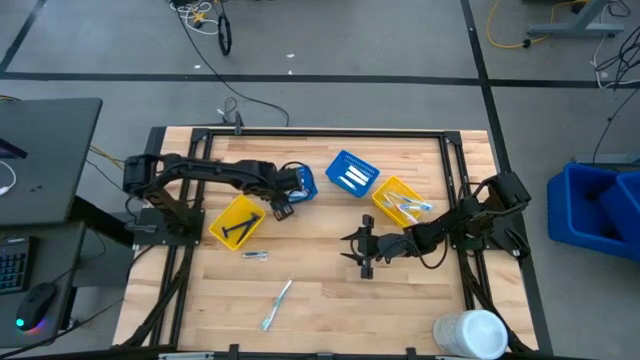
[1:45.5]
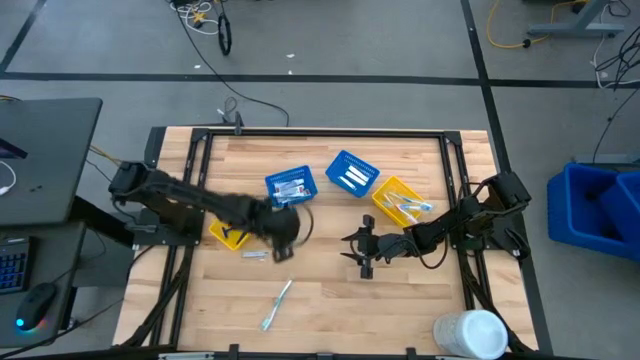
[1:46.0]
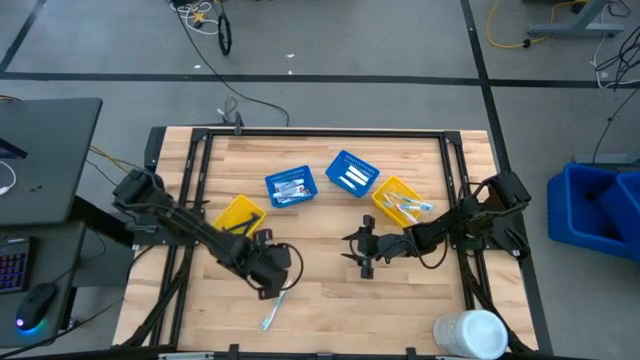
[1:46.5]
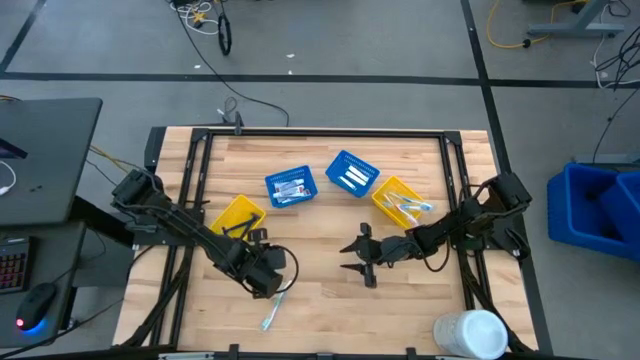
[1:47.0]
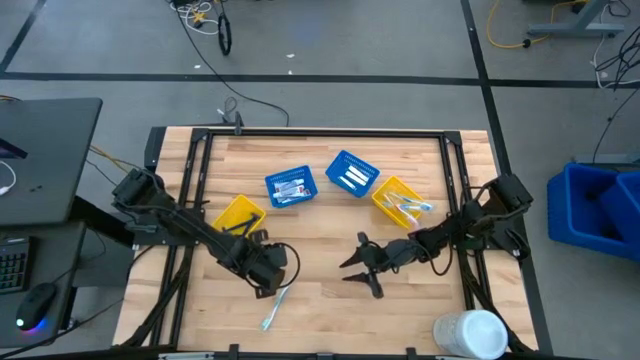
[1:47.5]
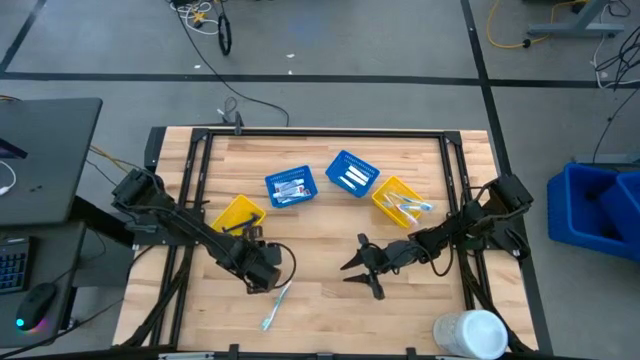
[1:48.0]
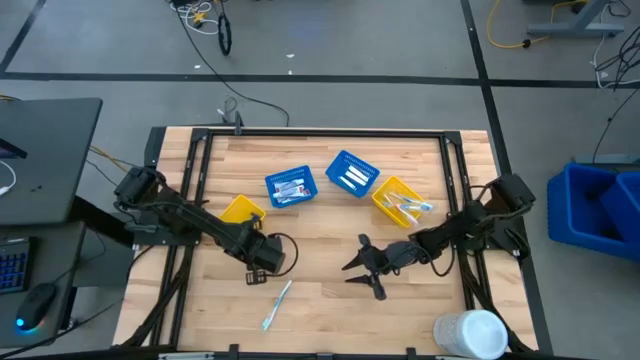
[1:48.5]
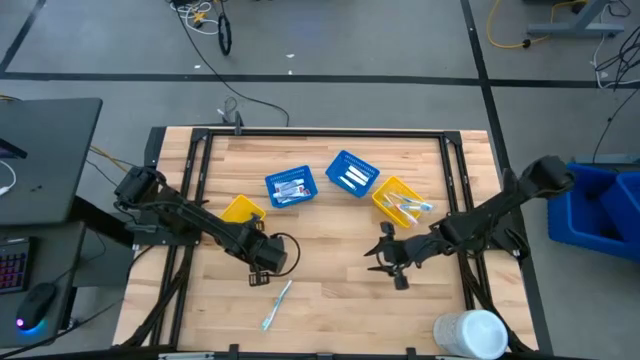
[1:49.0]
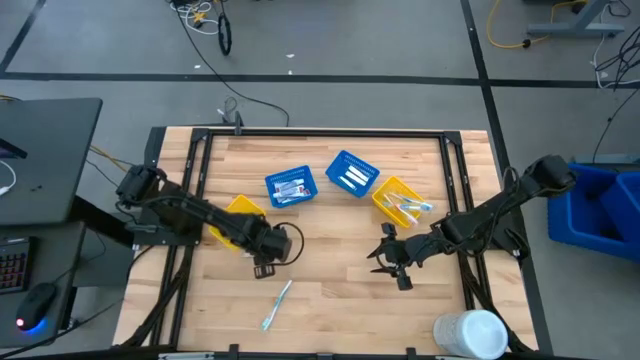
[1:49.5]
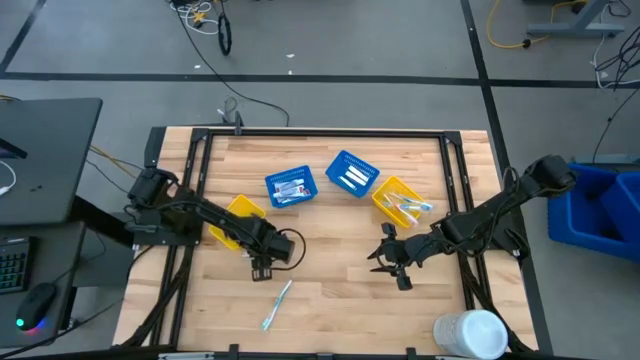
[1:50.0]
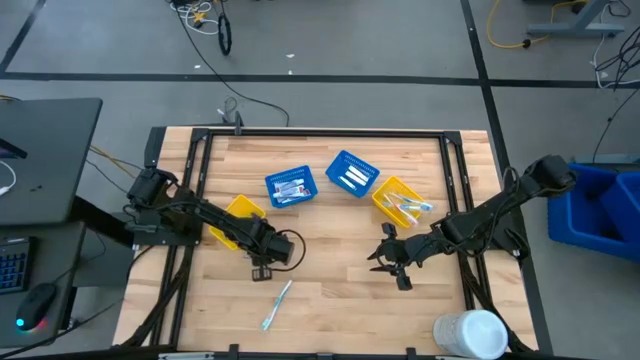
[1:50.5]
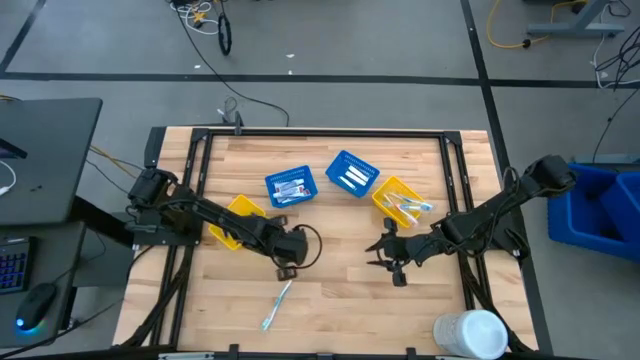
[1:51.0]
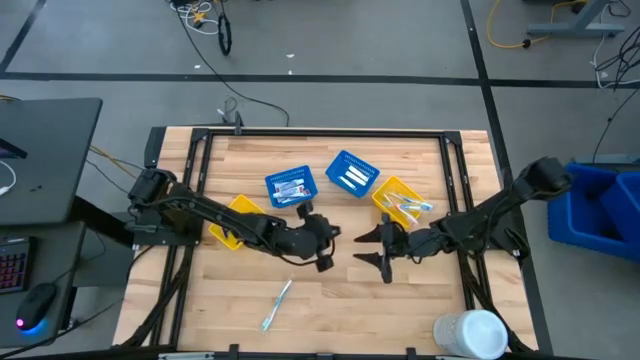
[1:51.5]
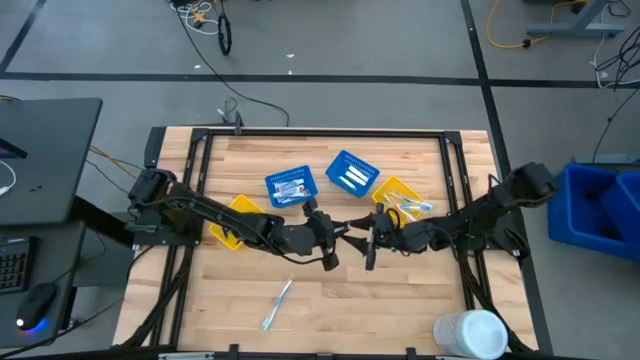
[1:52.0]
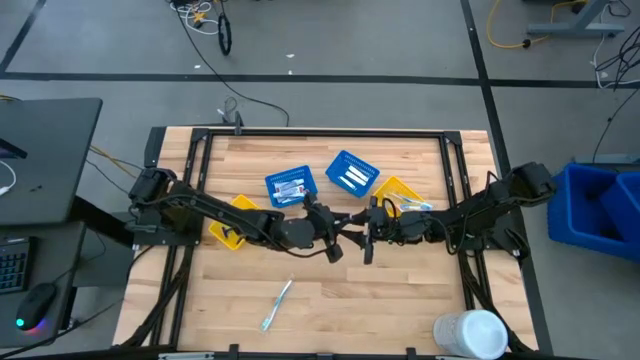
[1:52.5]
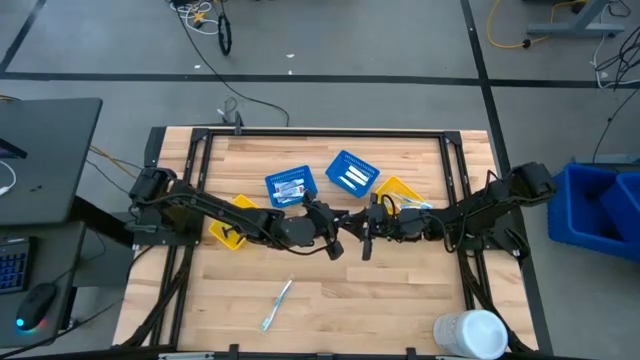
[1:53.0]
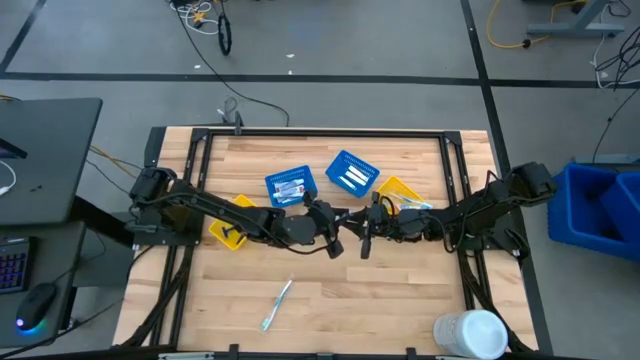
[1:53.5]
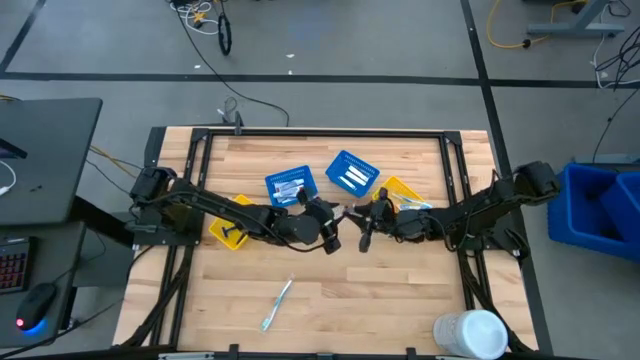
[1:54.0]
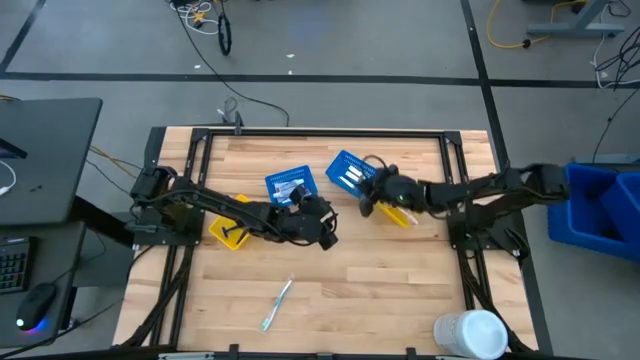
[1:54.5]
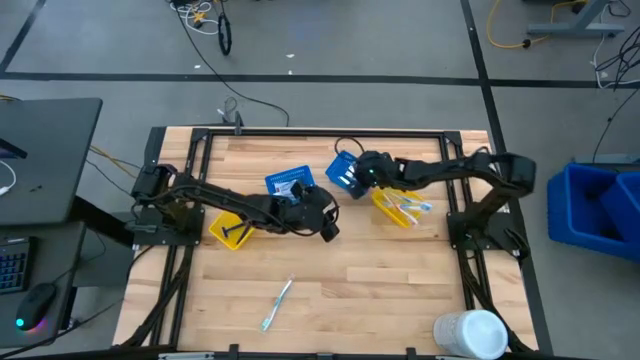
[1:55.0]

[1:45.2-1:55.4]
Task: Pick & Place Travel size toiletries
Put the silver nail cutter into the right blue bin

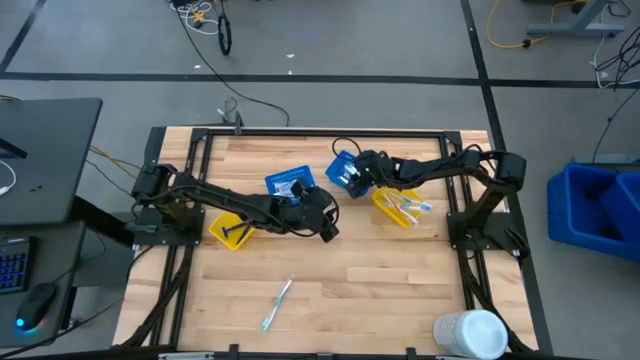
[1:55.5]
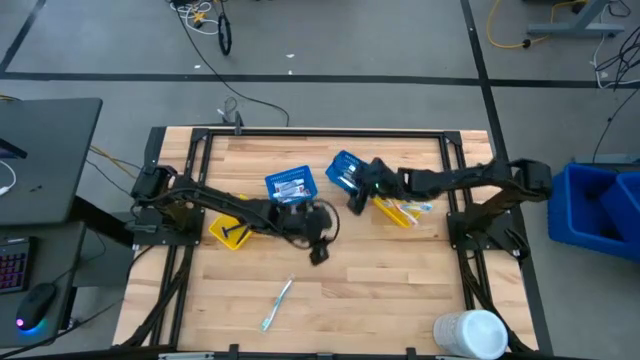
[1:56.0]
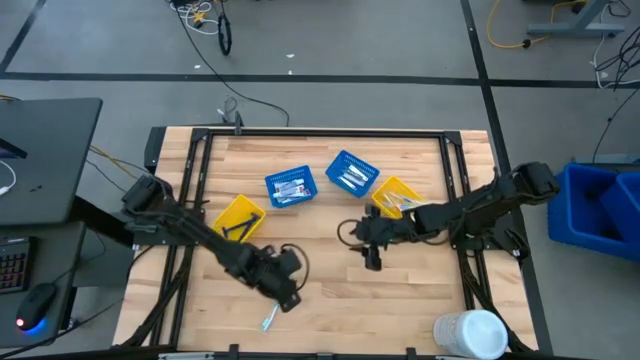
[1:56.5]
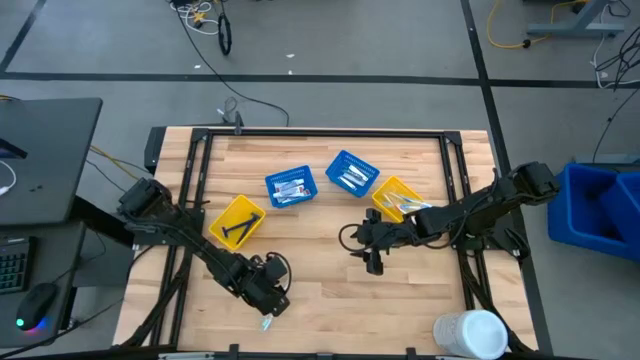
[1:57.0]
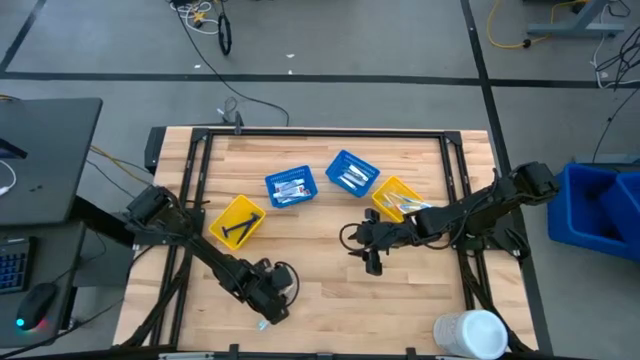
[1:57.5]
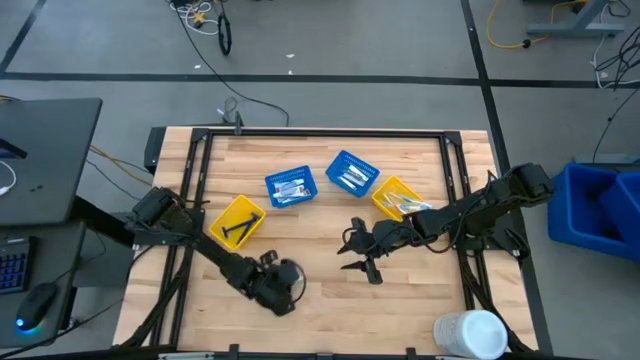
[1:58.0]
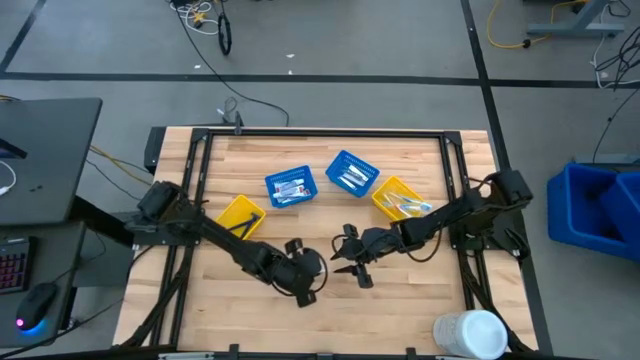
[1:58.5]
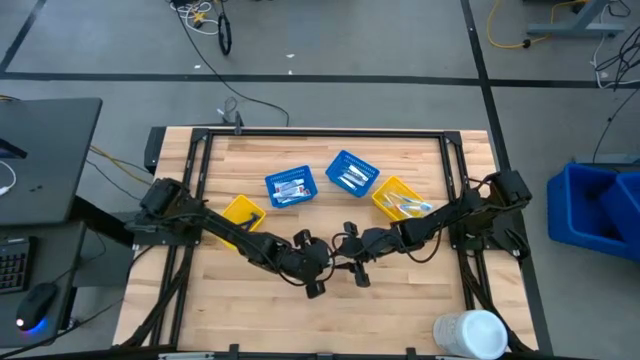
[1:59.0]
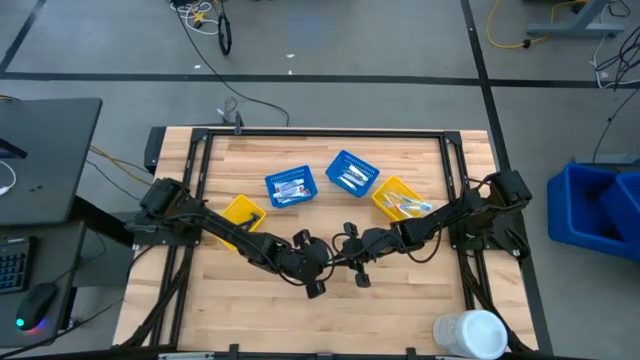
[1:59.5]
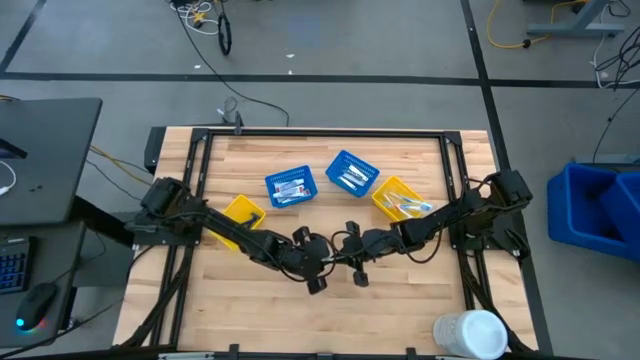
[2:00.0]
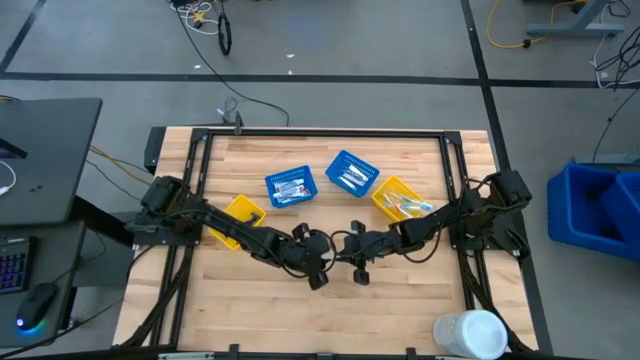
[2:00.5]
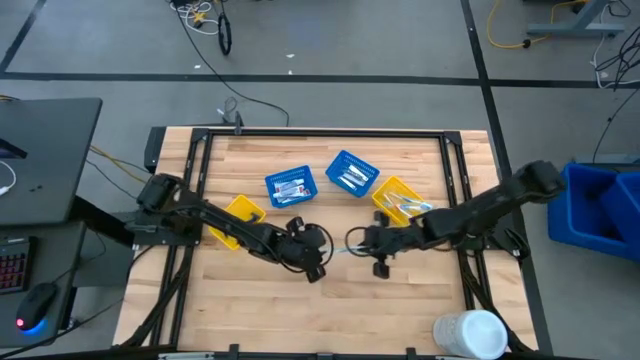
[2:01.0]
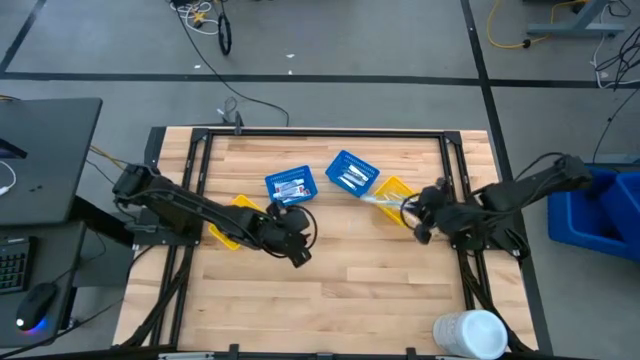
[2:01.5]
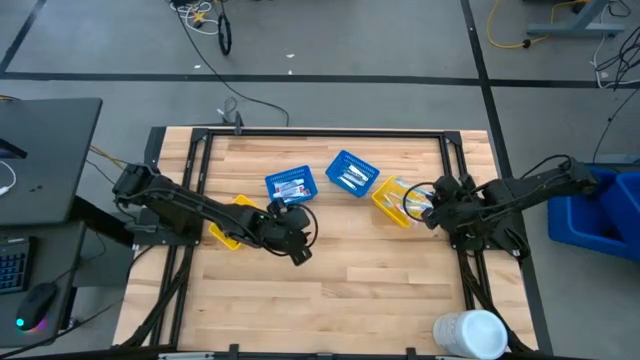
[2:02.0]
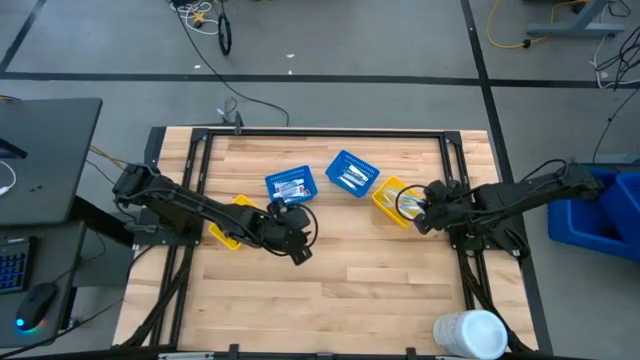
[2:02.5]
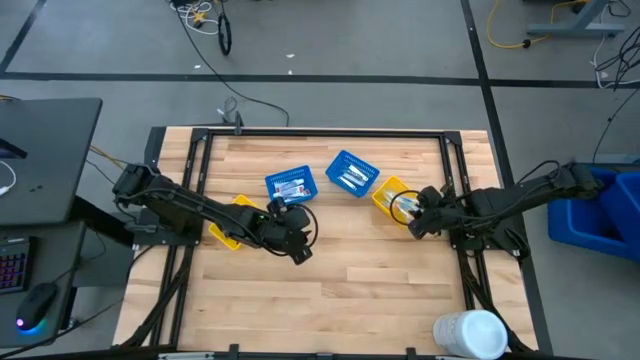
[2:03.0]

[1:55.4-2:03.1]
Put the blue toothbrush into the right yellow bin

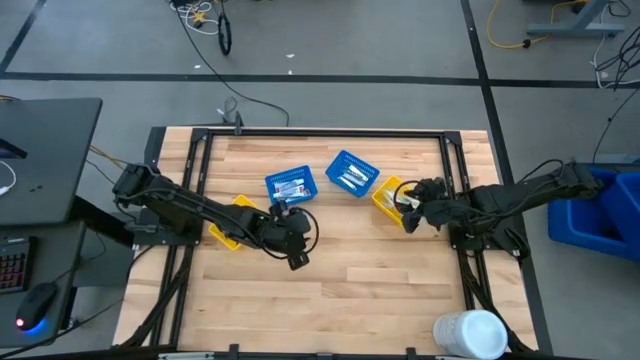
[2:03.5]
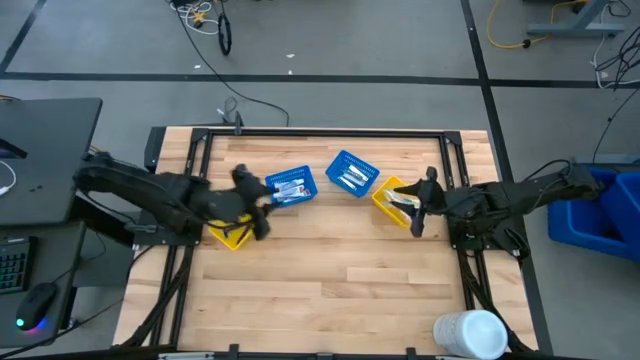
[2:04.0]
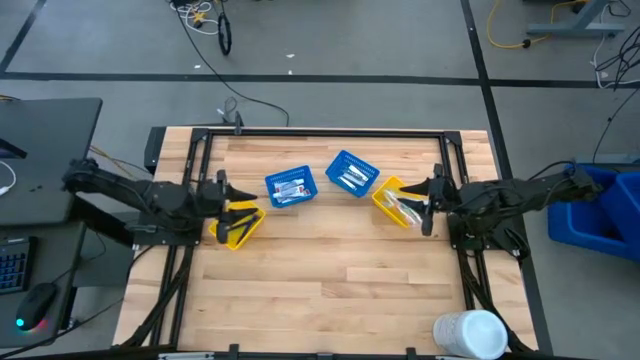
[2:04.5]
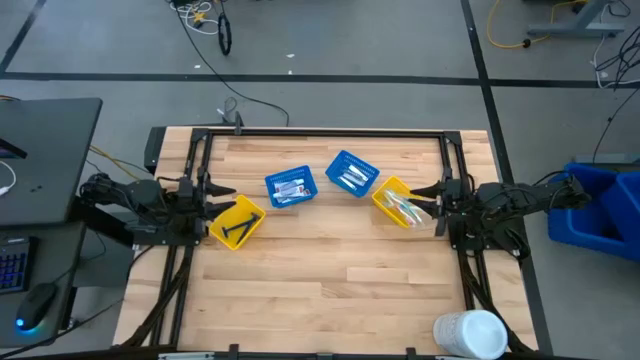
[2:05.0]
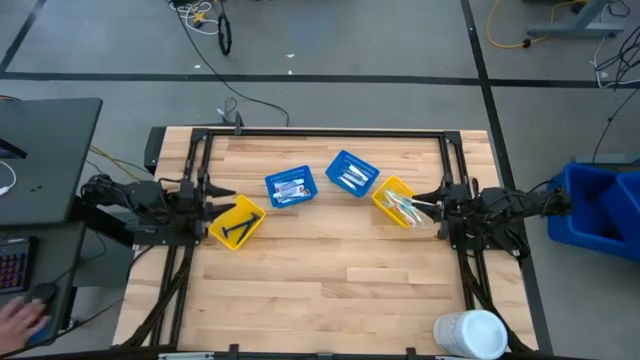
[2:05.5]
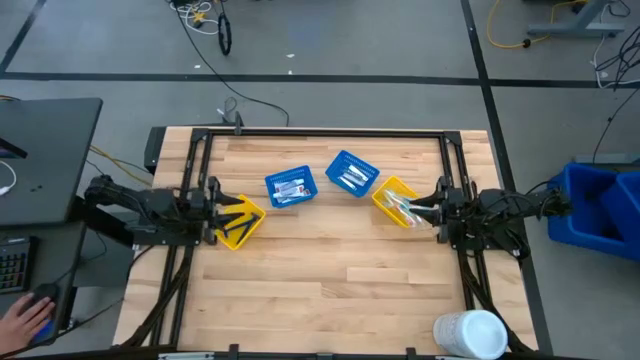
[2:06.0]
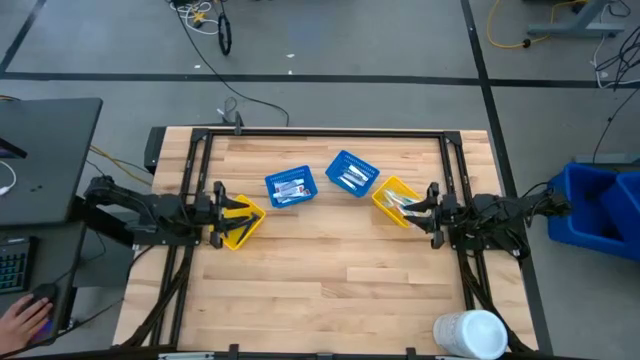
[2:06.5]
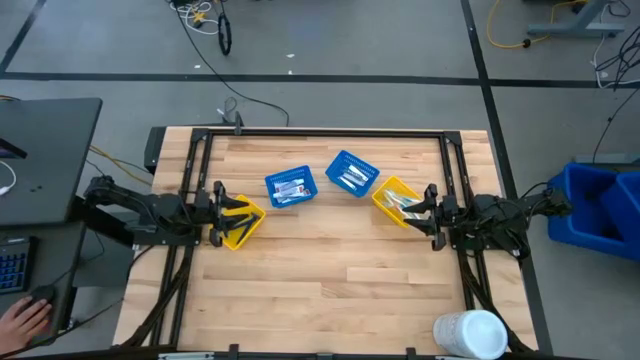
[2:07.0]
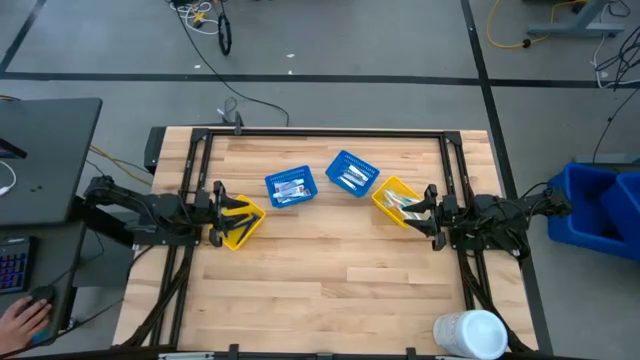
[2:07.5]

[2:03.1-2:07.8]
Return to Home Position
